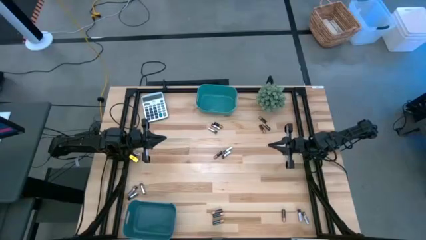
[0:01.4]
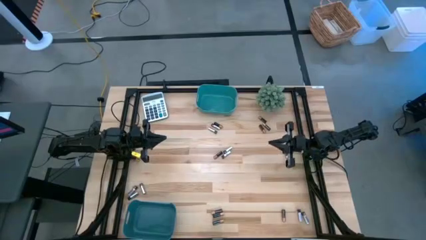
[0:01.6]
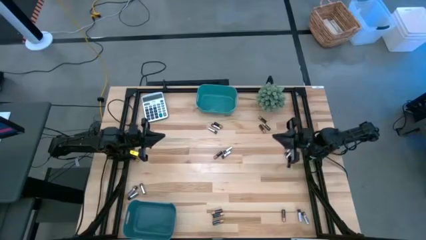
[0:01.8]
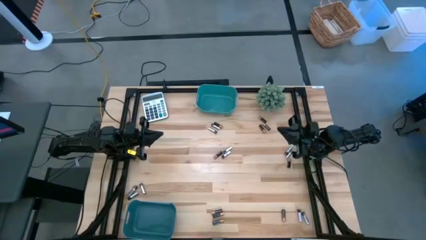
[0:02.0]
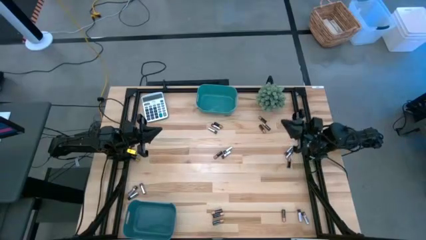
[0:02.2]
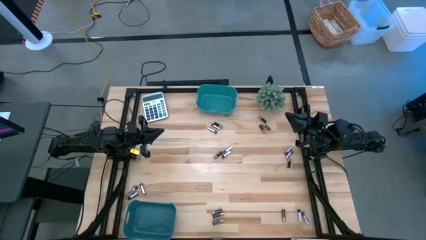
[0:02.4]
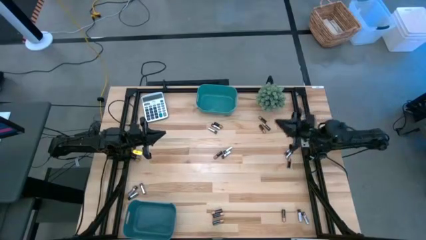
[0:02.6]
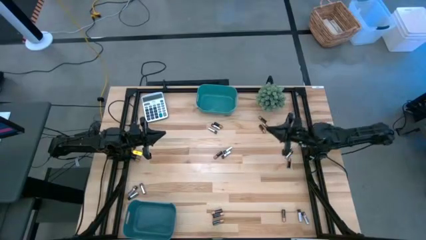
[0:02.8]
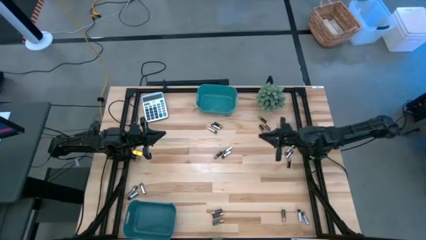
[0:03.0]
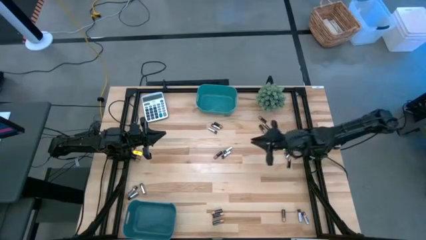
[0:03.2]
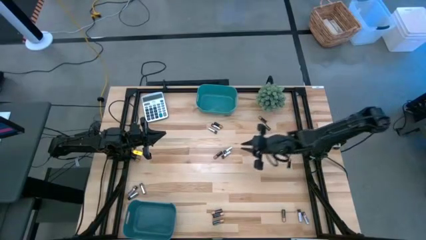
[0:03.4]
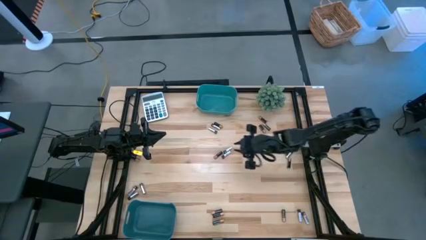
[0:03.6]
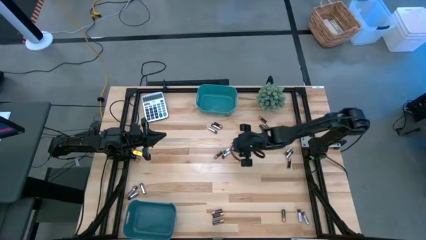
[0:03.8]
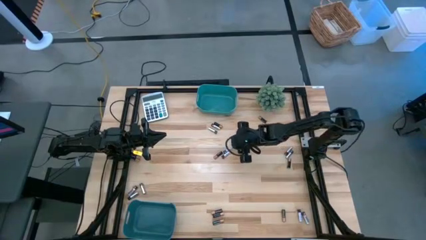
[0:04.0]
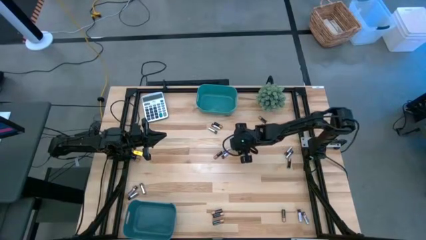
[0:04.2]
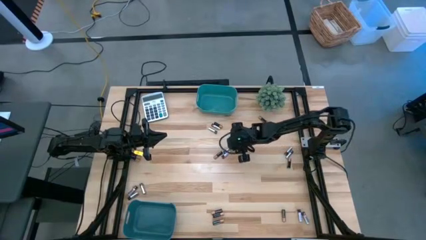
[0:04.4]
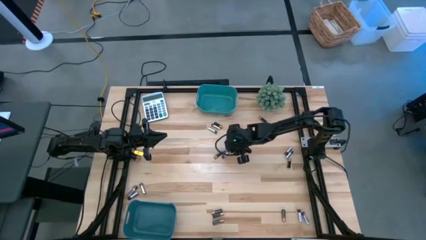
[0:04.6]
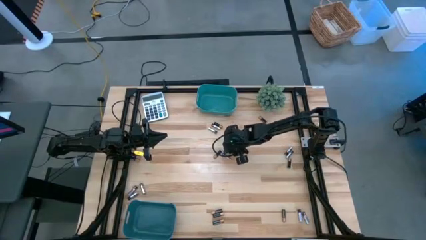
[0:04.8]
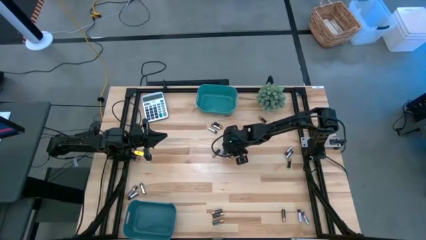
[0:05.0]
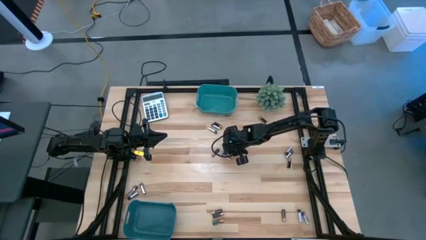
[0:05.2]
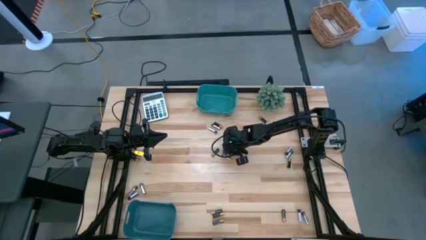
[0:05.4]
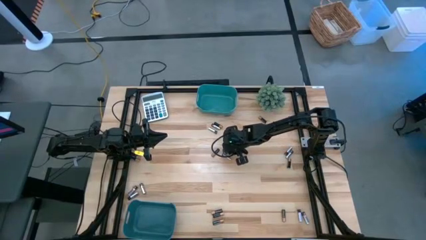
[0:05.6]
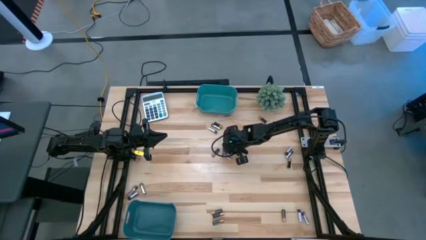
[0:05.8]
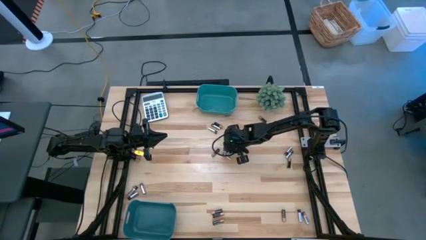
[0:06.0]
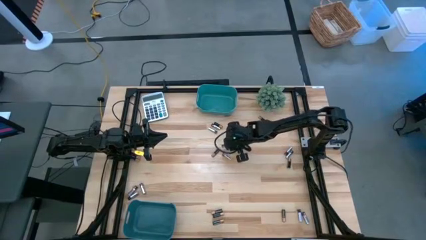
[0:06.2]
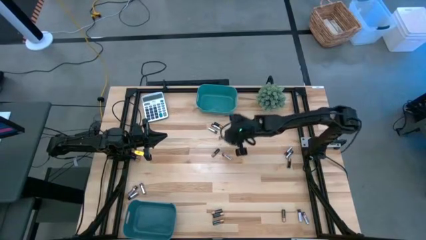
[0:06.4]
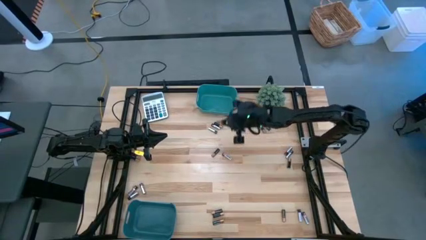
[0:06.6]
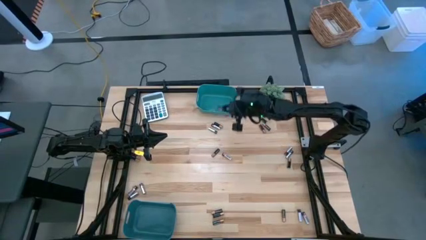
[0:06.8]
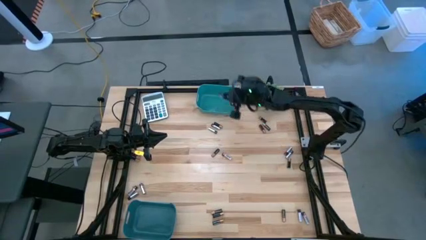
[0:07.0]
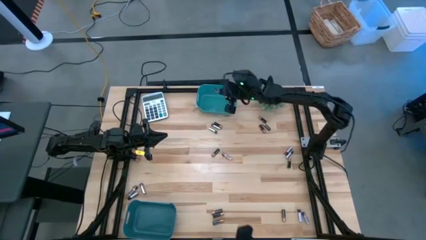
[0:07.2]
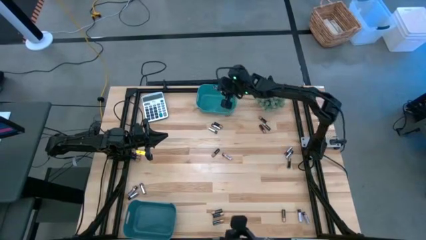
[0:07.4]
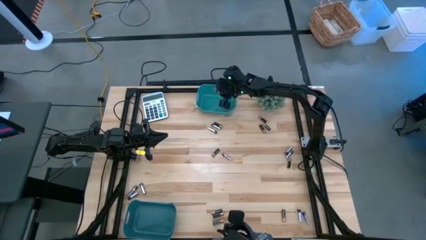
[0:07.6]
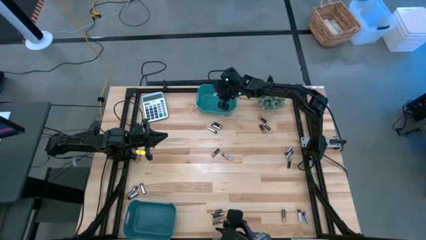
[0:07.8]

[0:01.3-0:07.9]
Task: Sort batteries
Put the silver battery into the top green bin

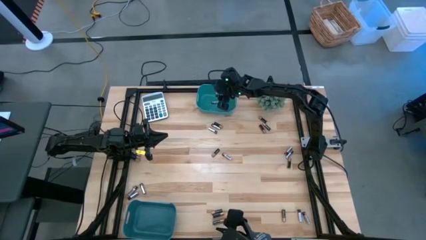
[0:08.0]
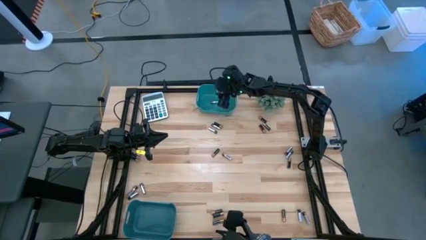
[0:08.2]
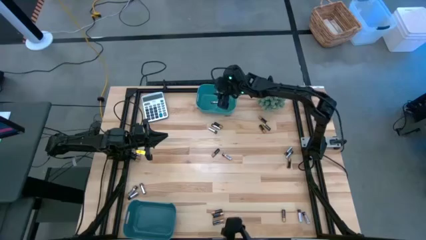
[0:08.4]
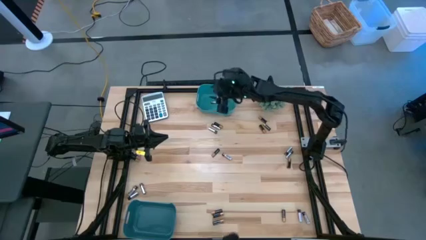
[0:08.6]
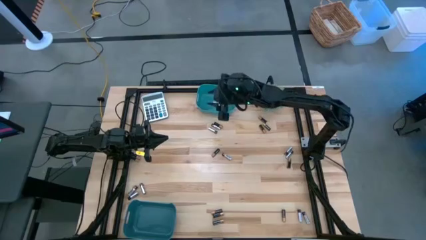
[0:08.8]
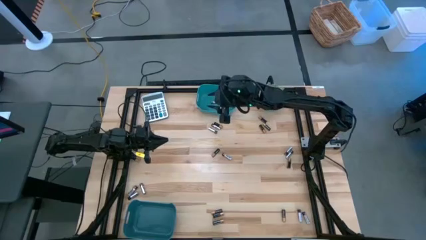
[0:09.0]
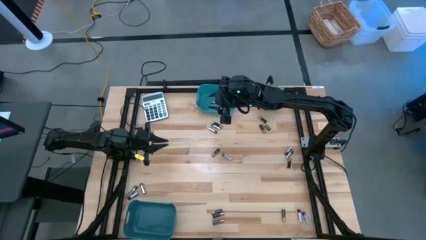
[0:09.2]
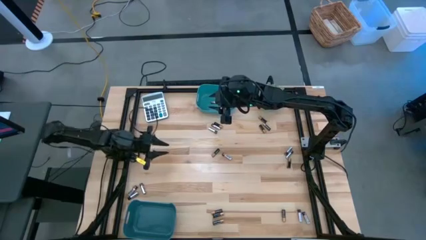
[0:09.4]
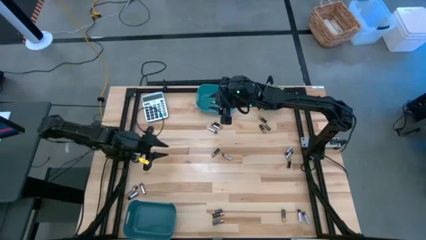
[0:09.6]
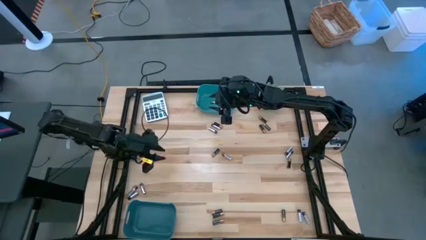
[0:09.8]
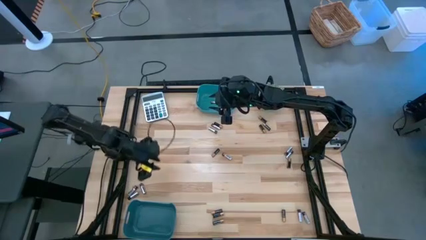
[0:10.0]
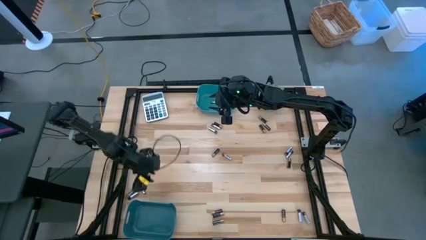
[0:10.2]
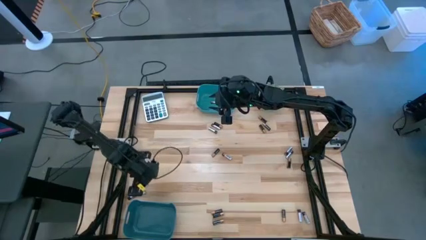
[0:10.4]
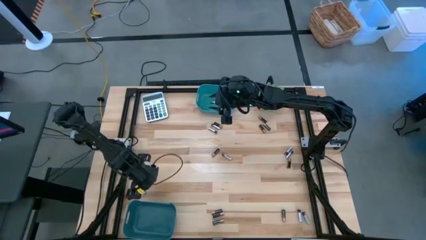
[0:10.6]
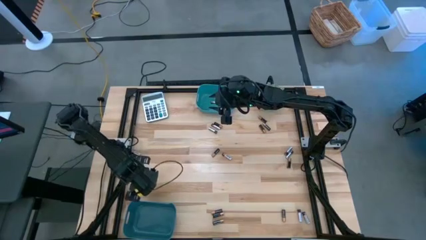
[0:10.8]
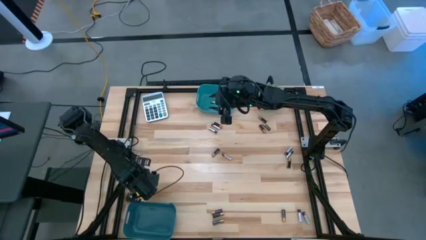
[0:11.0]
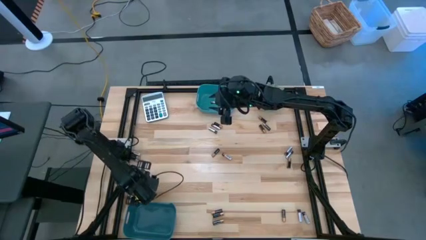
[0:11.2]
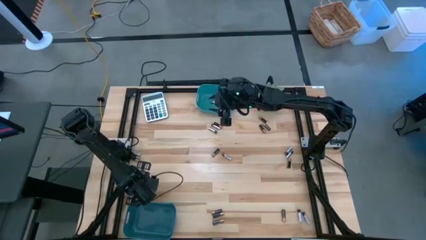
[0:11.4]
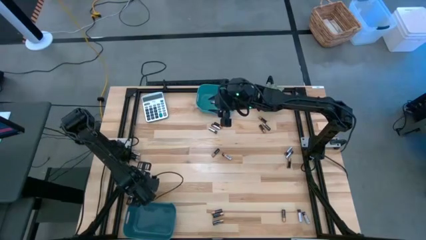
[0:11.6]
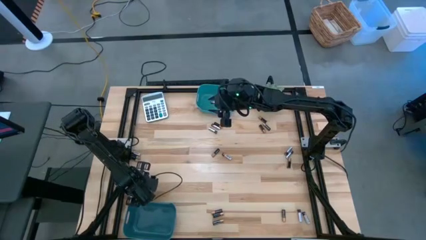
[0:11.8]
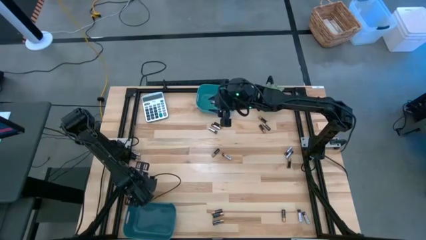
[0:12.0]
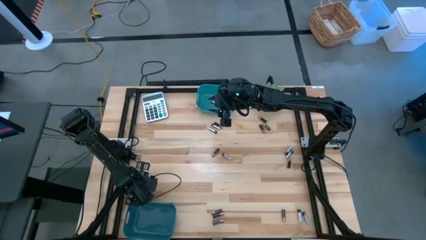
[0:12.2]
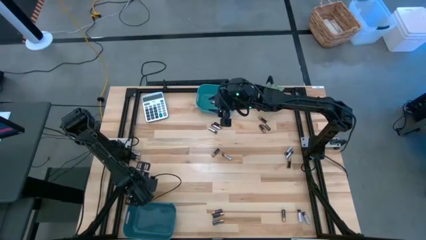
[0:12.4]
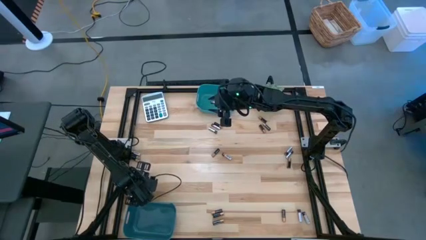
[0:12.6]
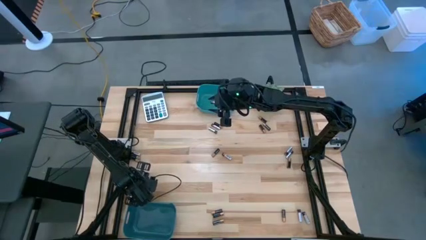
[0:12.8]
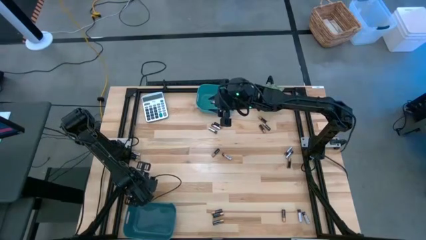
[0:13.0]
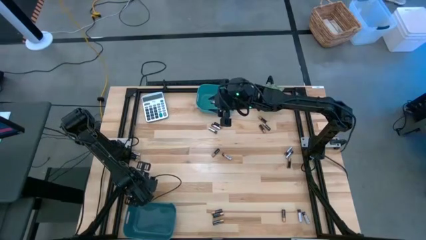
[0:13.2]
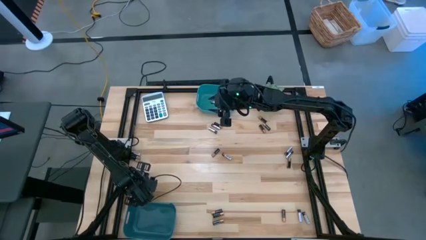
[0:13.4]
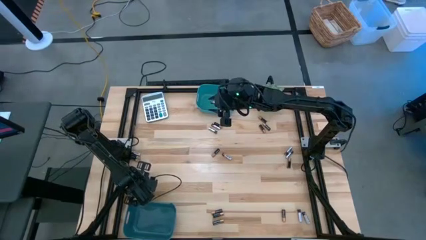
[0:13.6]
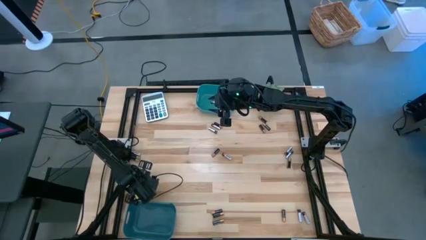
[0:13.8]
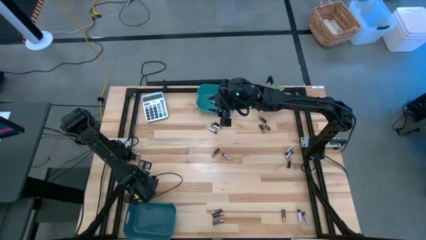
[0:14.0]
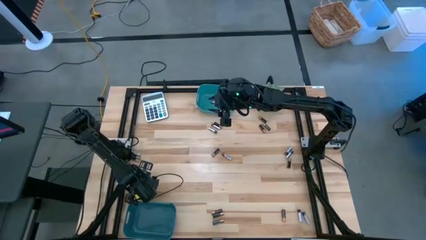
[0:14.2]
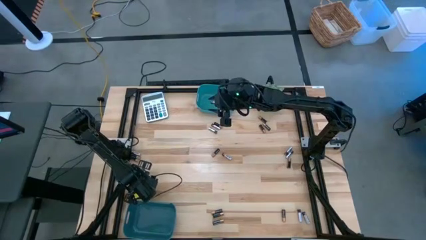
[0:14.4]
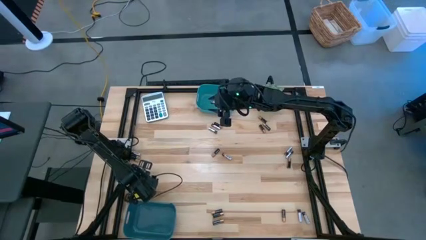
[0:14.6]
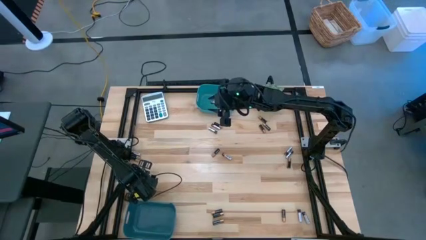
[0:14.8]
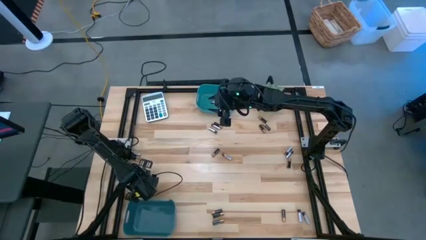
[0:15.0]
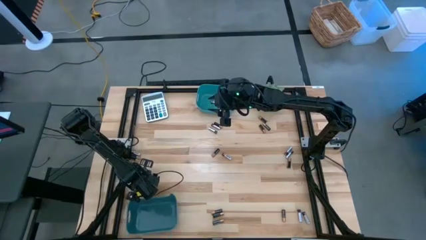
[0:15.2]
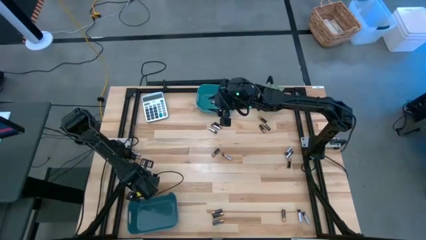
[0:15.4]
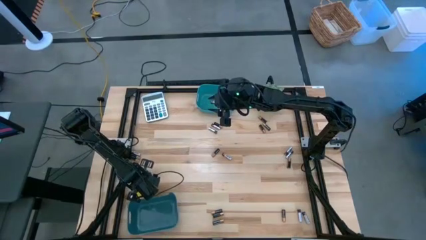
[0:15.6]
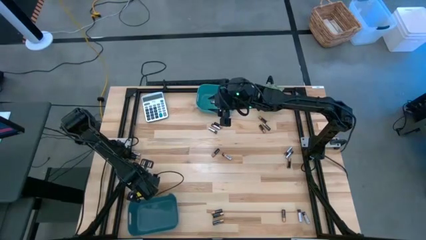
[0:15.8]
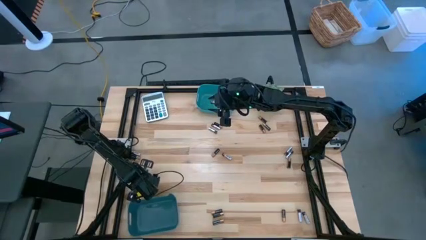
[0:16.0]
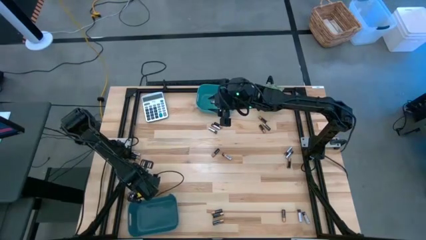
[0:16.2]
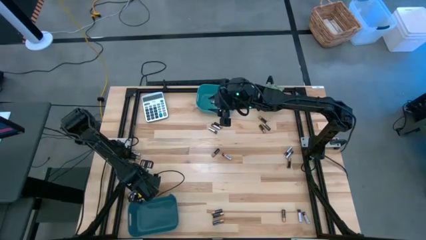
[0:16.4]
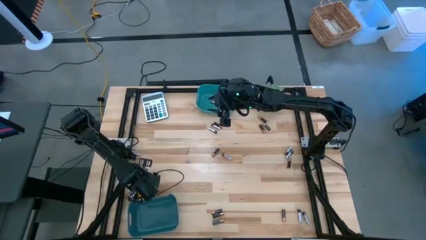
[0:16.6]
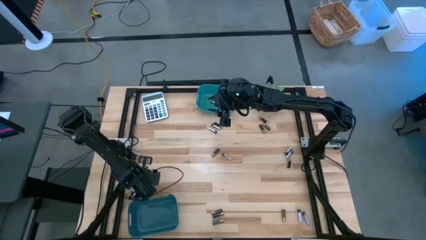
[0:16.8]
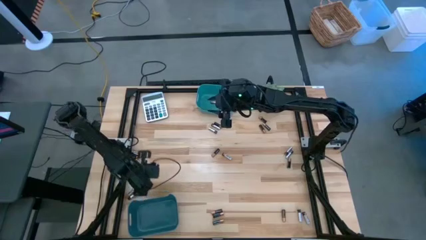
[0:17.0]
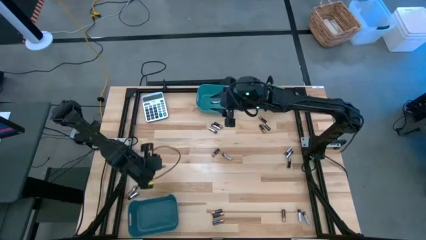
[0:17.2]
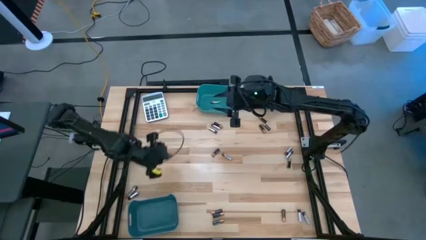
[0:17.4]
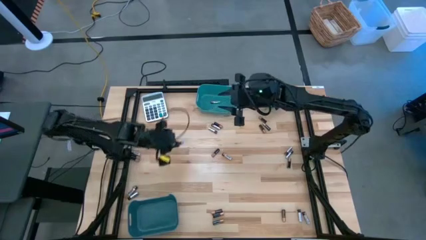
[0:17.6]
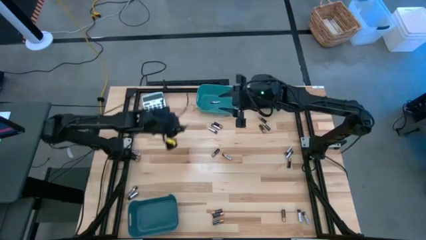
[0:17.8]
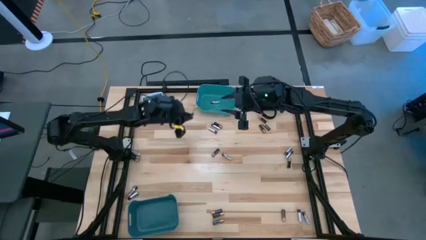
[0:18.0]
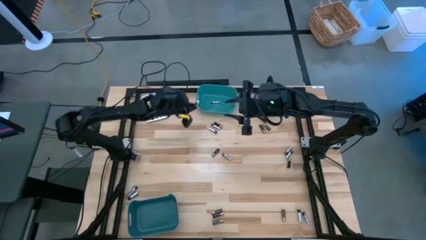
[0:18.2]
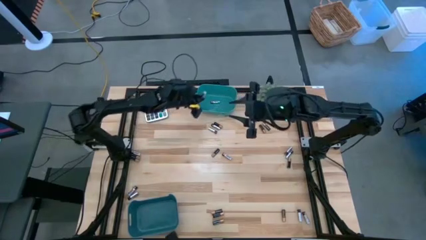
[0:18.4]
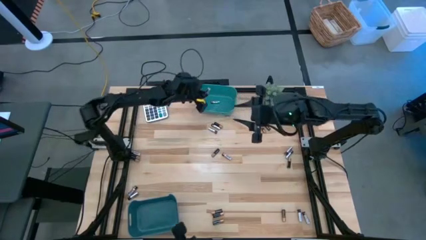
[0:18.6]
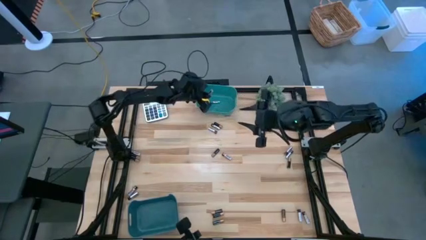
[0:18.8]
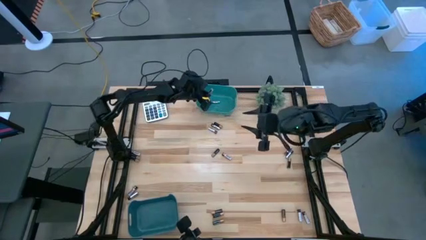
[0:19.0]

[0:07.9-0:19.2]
Put the silver battery into the top green bin
